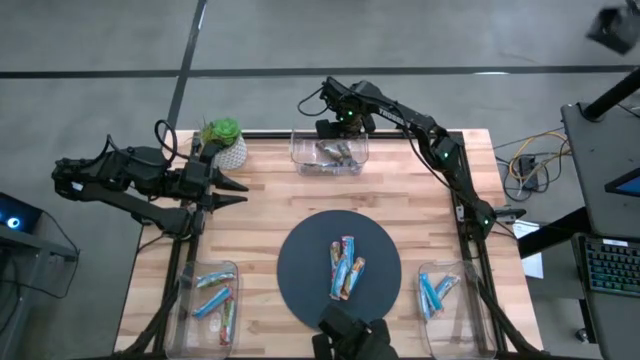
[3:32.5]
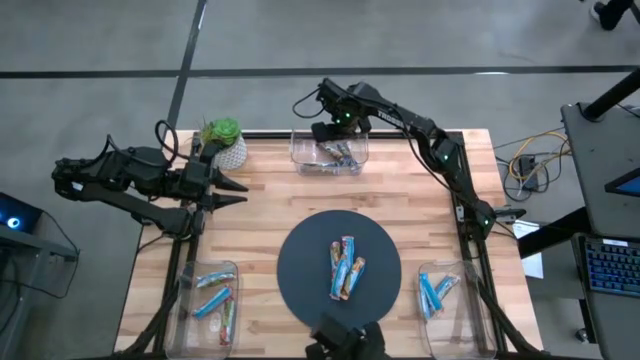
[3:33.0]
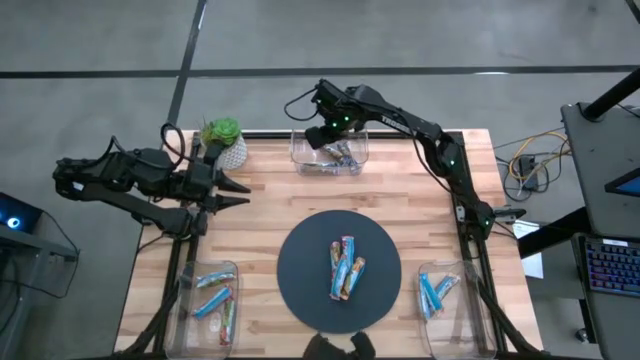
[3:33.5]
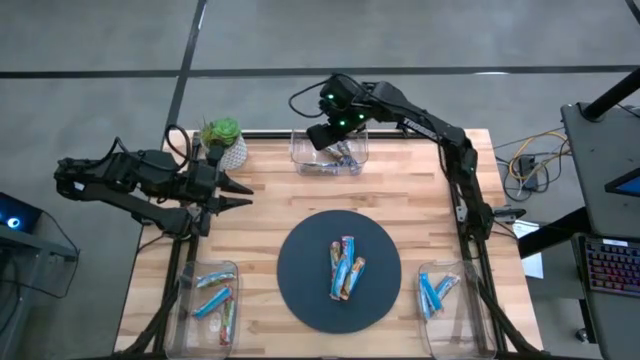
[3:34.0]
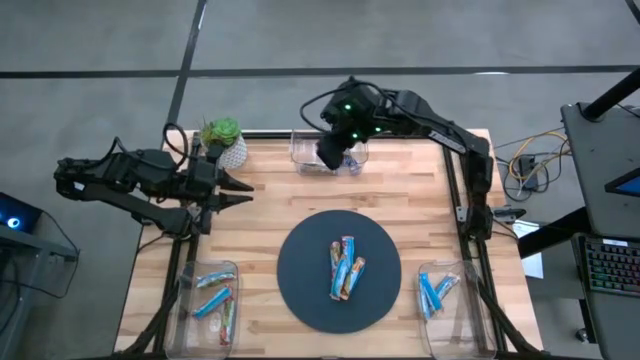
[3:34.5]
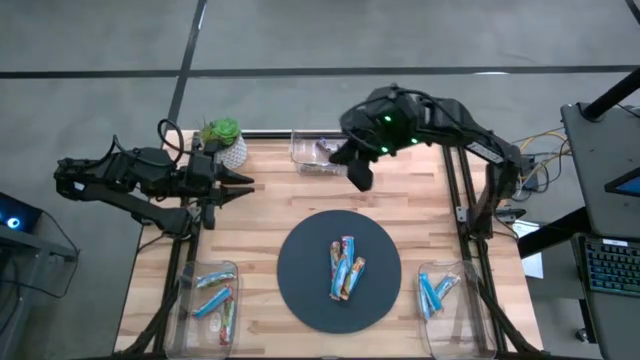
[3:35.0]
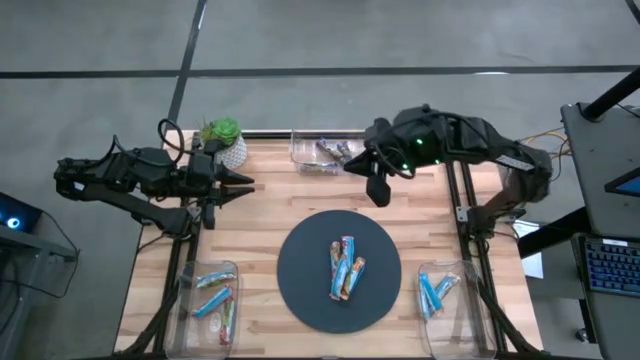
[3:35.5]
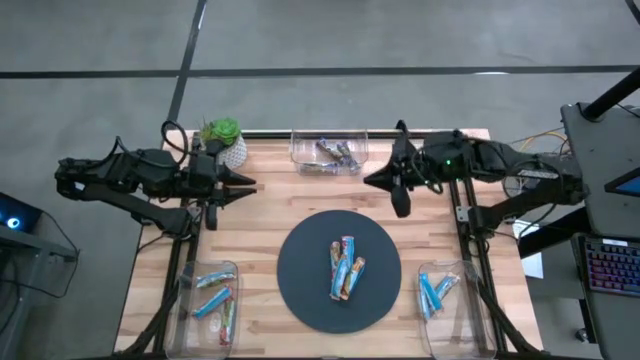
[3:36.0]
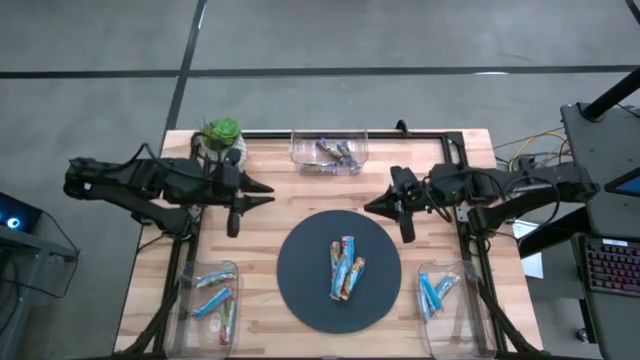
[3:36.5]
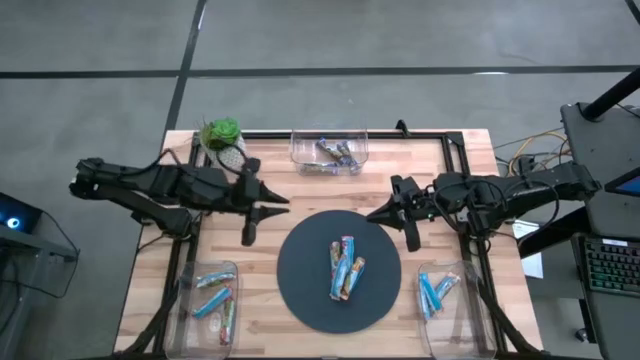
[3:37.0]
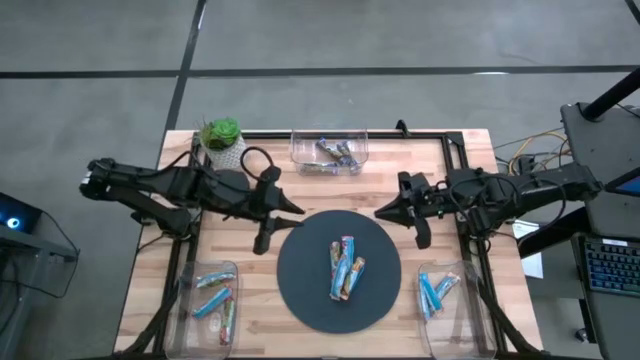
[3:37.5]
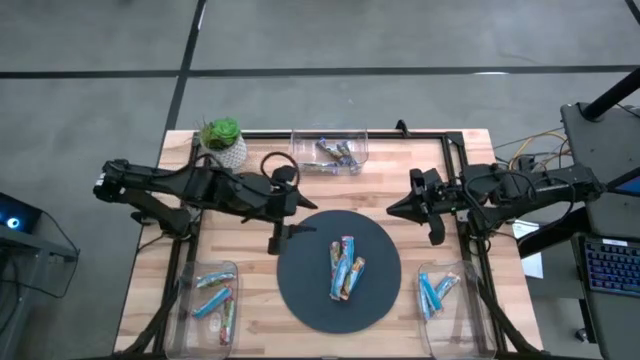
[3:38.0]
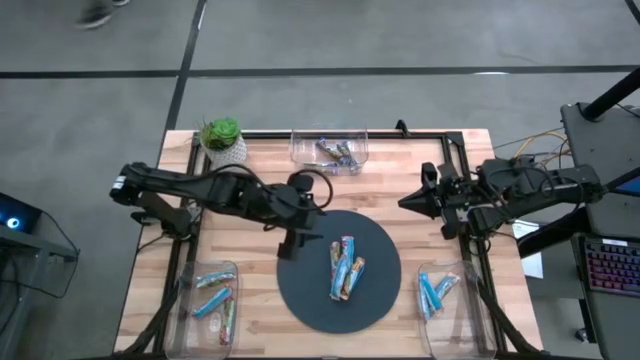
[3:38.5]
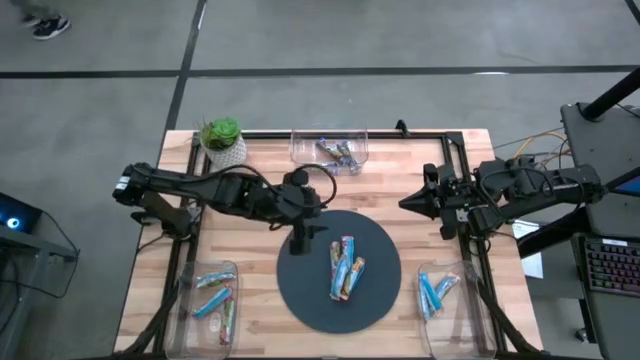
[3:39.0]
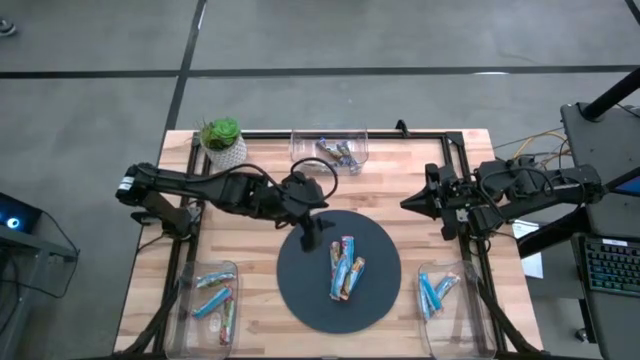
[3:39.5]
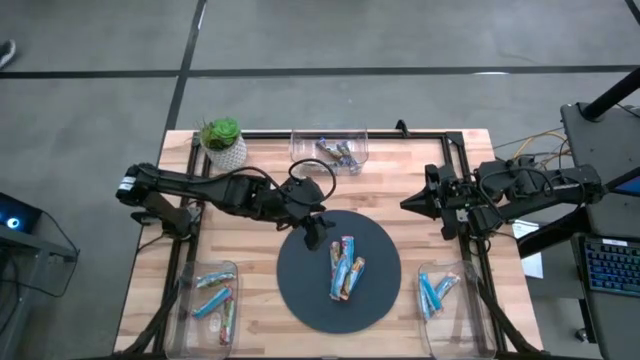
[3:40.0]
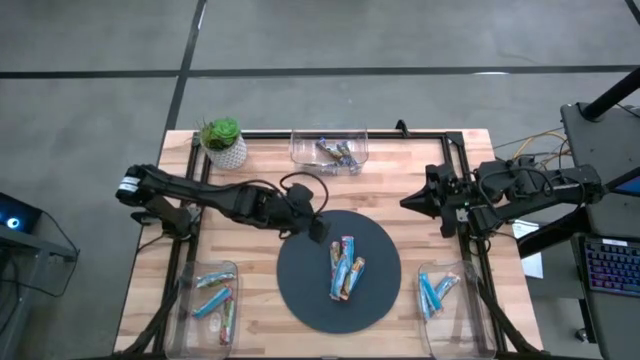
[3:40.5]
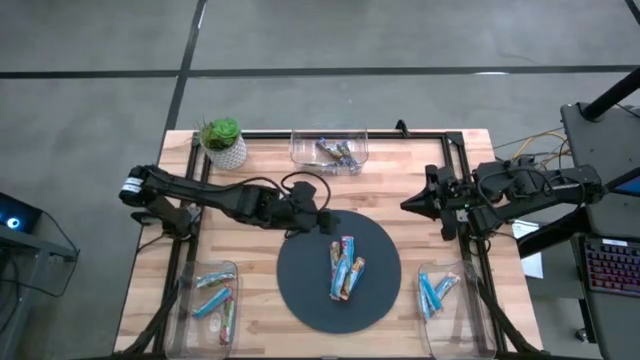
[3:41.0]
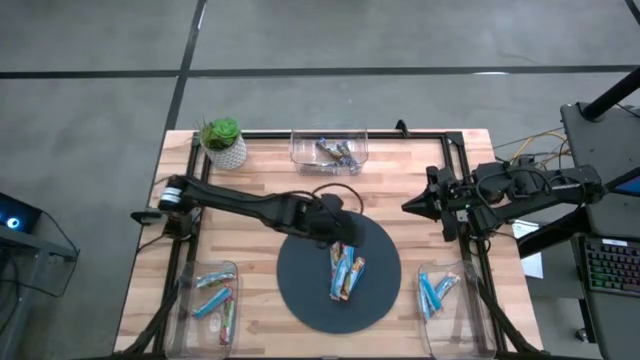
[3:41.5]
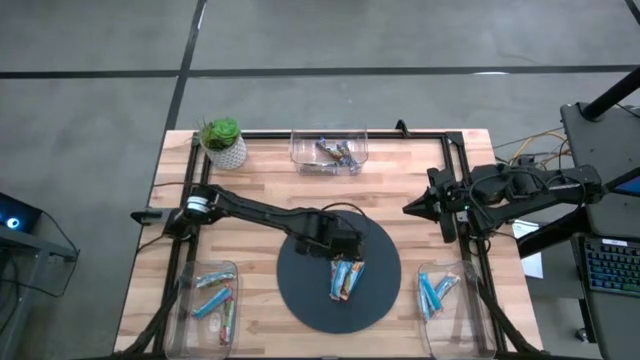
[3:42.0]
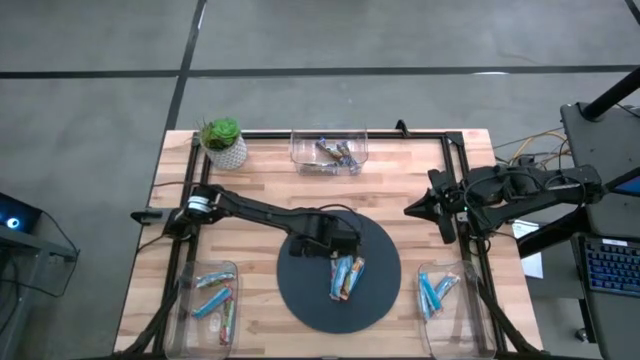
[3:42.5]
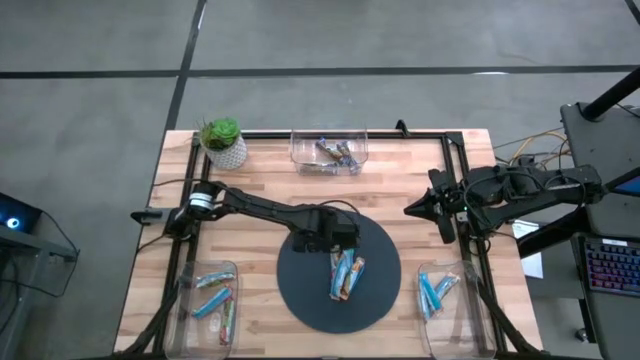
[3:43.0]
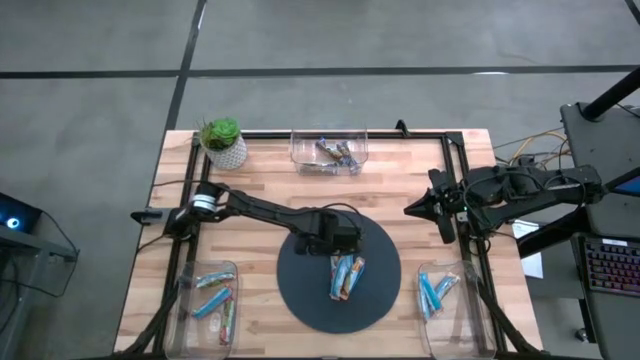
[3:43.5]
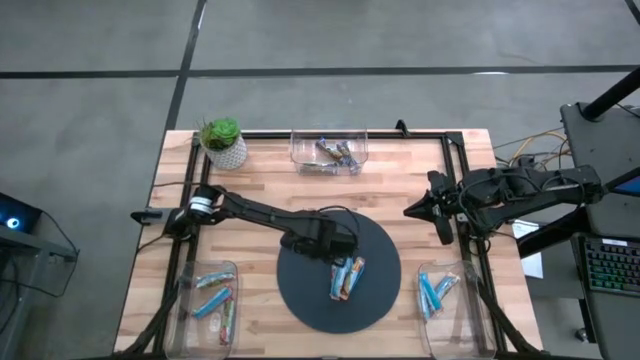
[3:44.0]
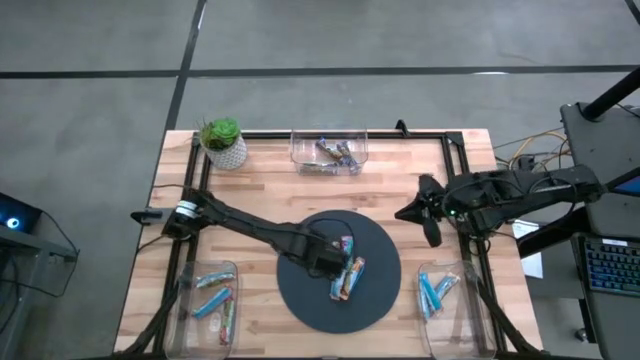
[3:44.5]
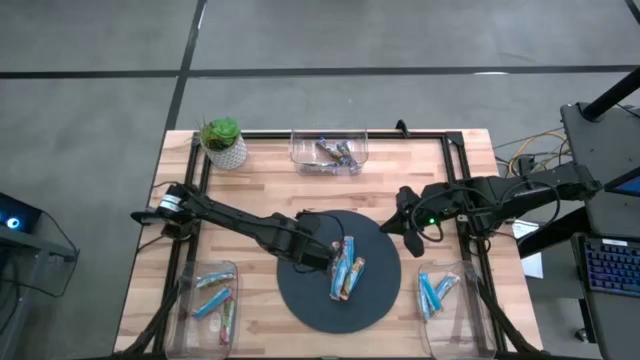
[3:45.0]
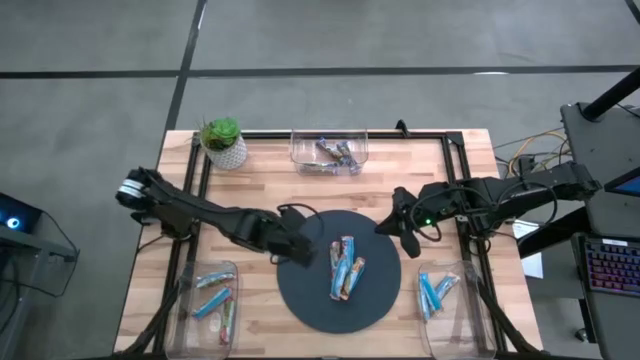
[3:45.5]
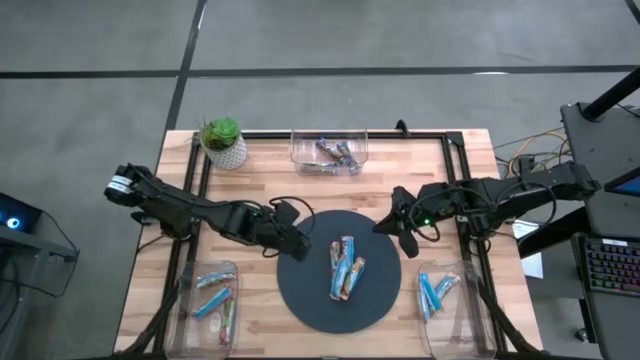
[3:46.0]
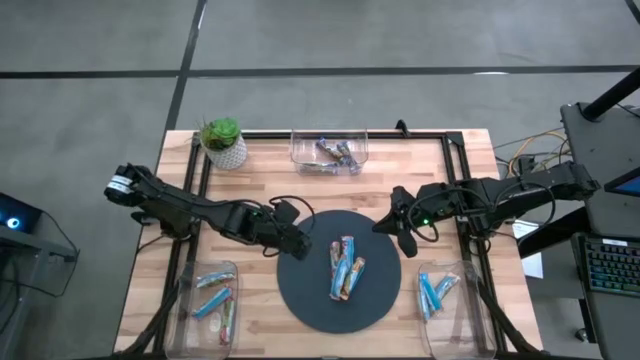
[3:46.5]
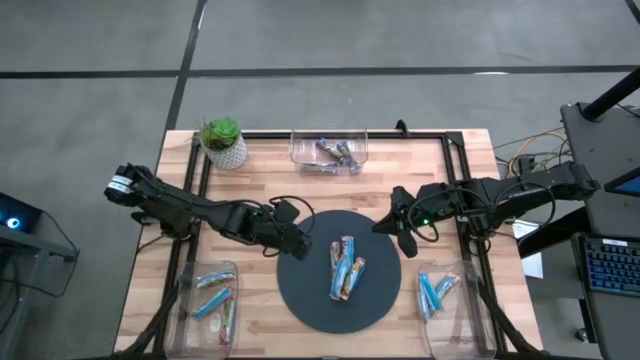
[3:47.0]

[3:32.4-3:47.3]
Task: Pick and place Granola Bars by type
Put the yellow granola bar into the bottom right transparent bin

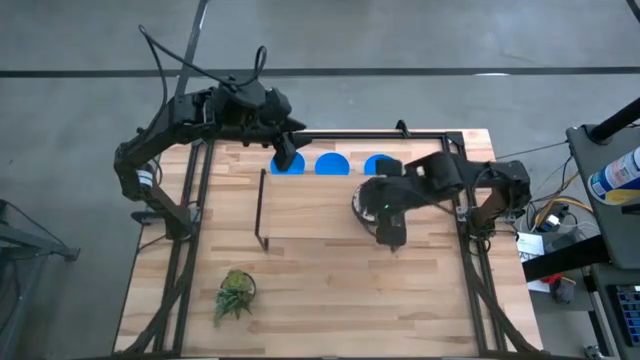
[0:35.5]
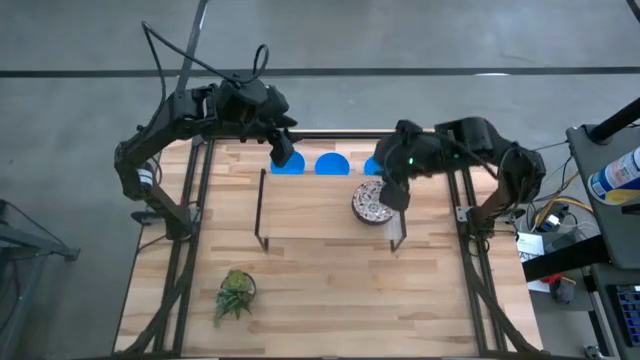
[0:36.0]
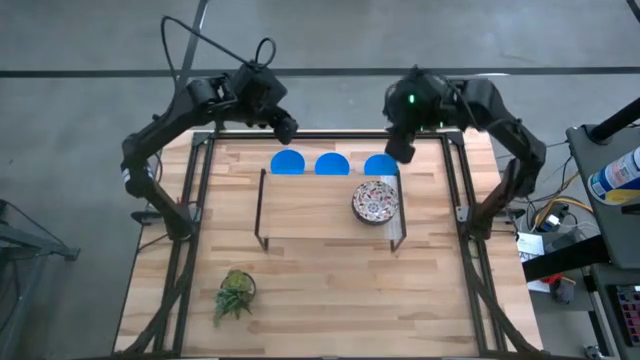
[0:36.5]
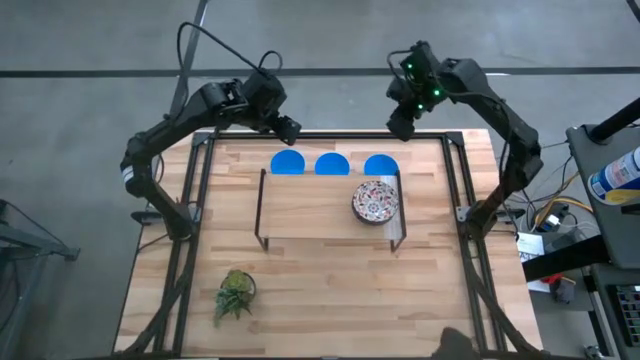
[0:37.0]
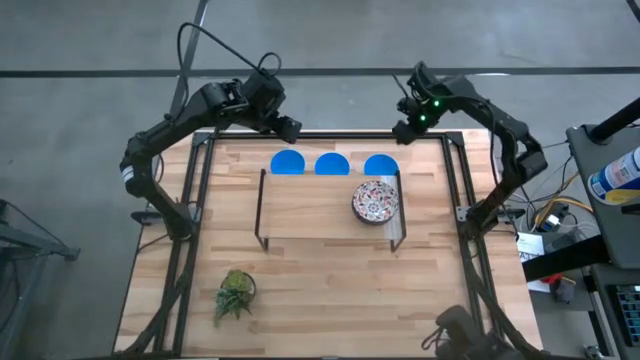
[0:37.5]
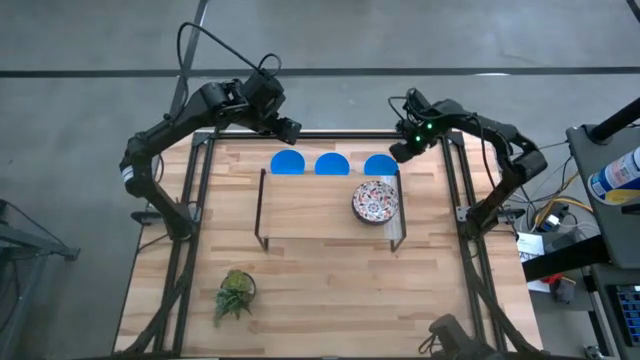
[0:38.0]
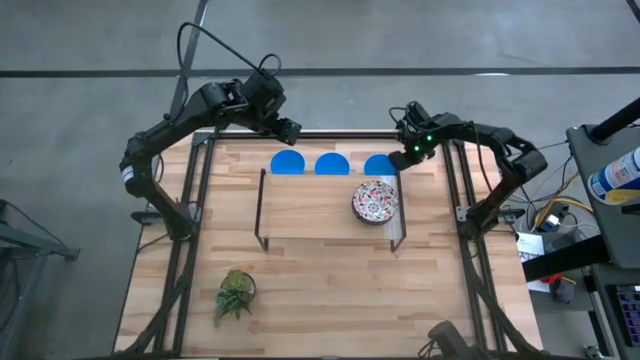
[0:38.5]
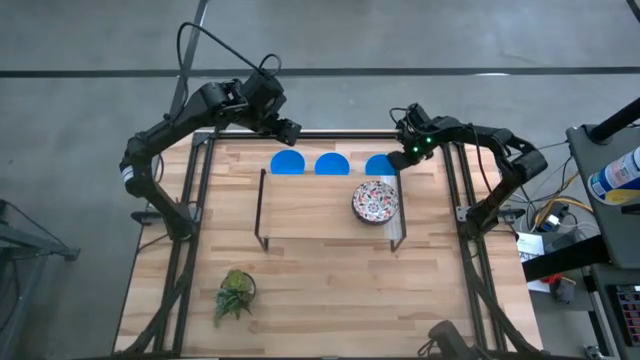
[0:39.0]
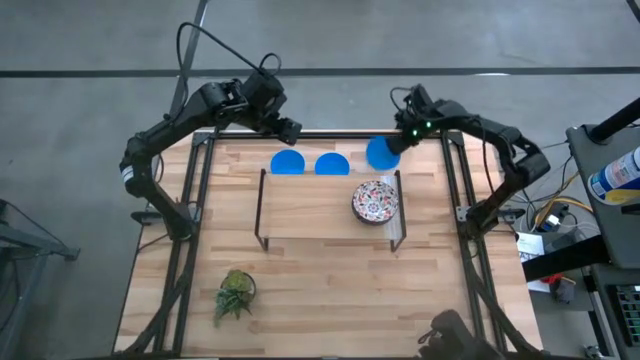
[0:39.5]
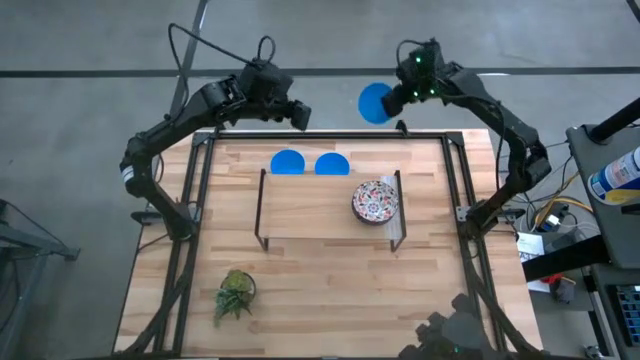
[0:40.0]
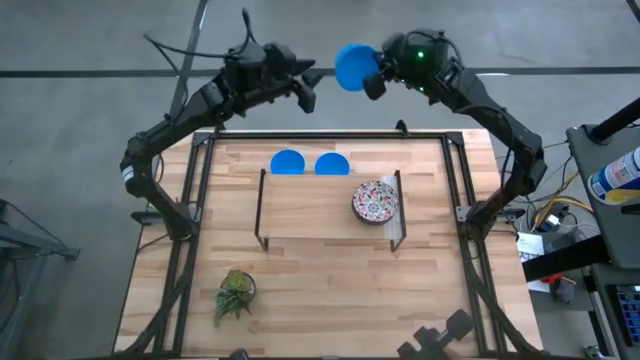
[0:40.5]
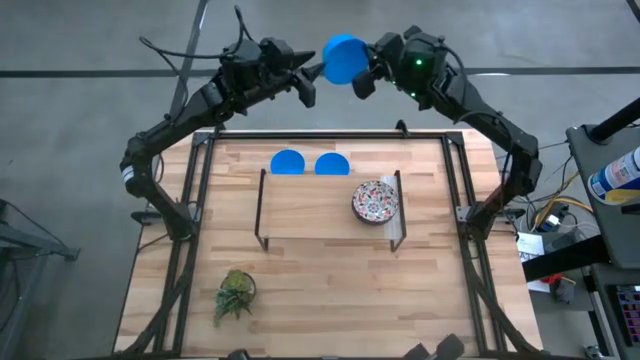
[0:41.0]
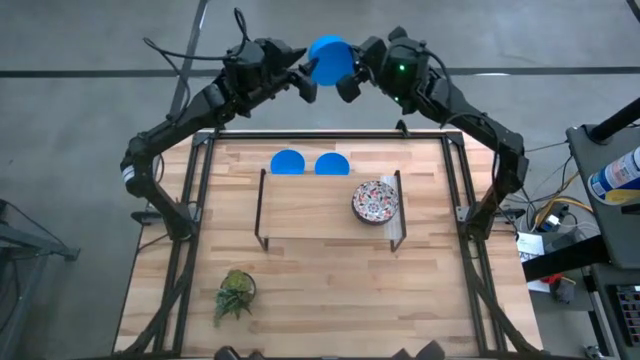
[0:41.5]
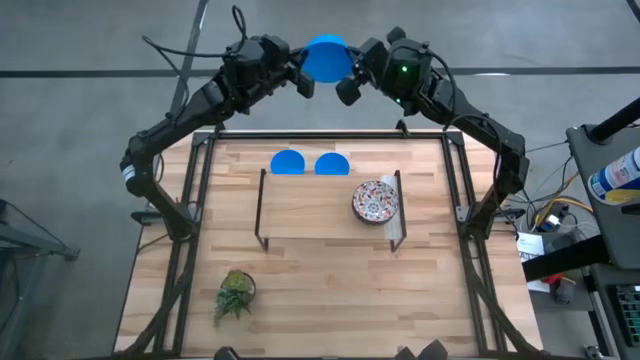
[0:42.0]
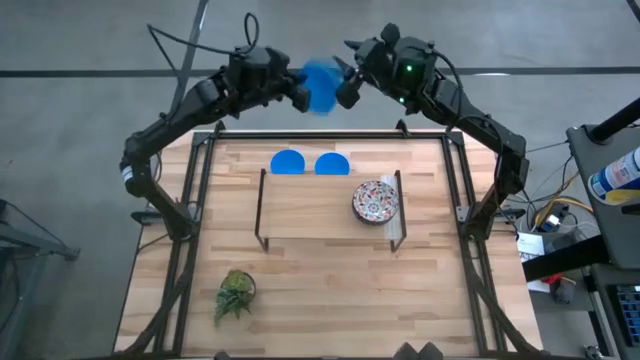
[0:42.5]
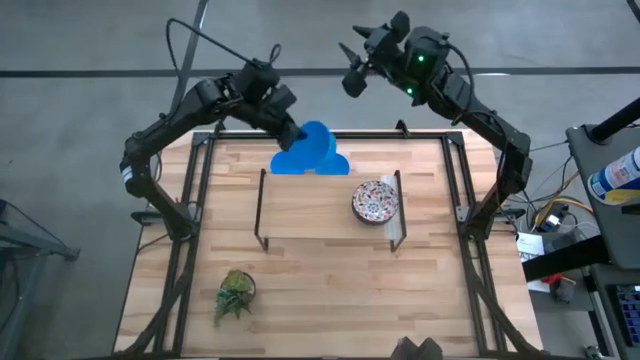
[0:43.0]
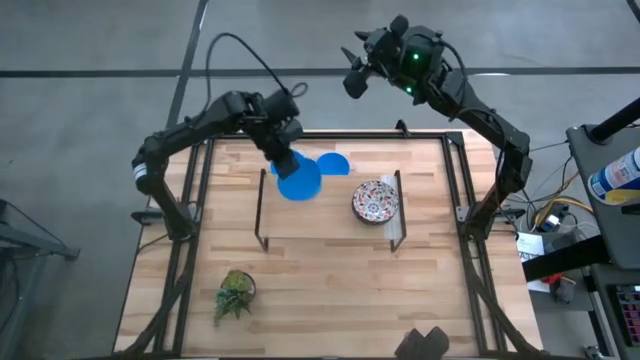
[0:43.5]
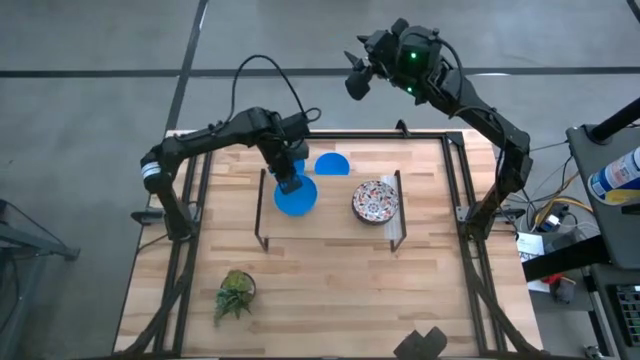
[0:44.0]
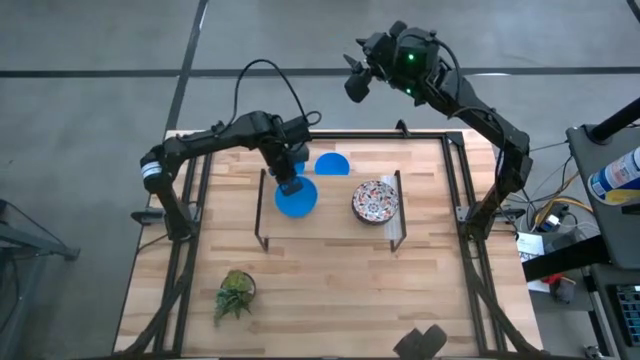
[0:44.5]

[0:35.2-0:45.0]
Task: Pick & Place Mini bowls
Put the right blue bowl on the shelf
